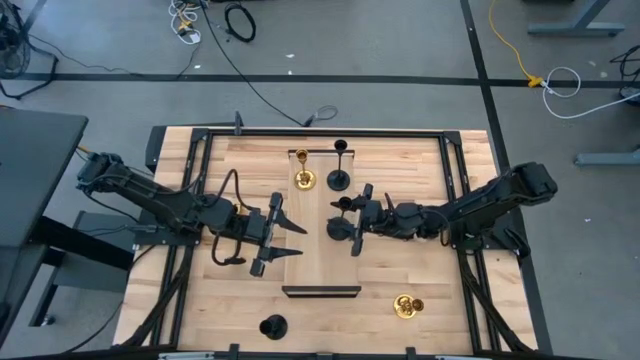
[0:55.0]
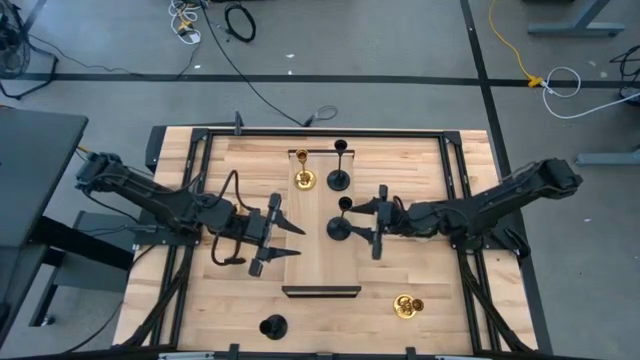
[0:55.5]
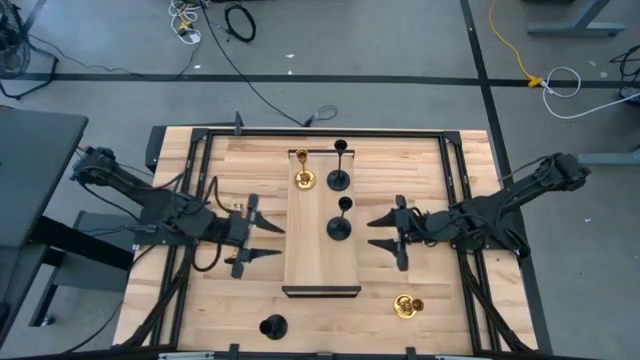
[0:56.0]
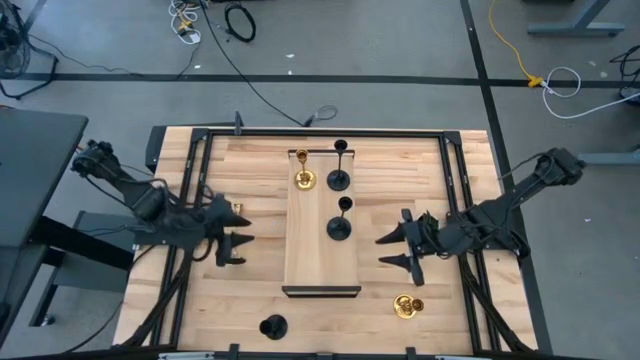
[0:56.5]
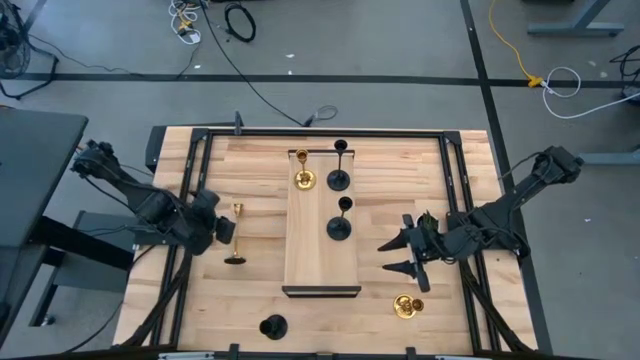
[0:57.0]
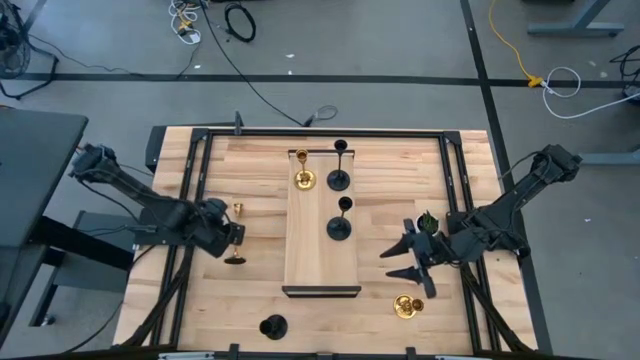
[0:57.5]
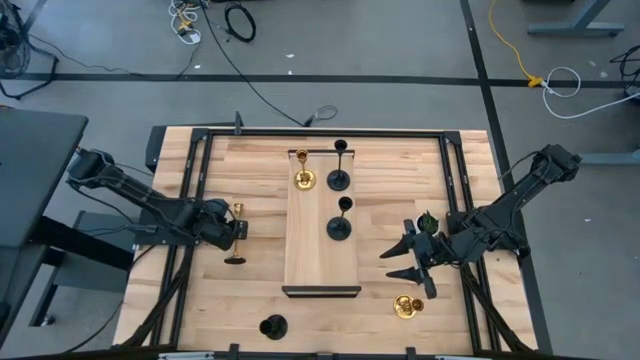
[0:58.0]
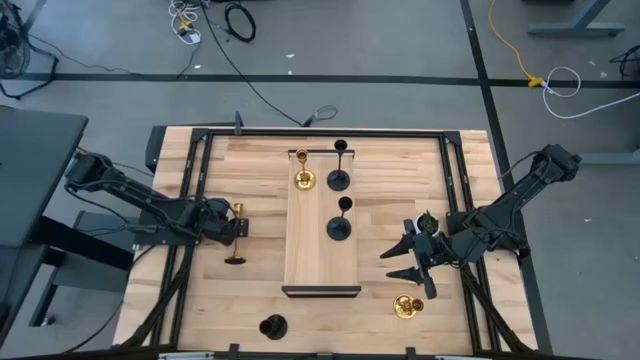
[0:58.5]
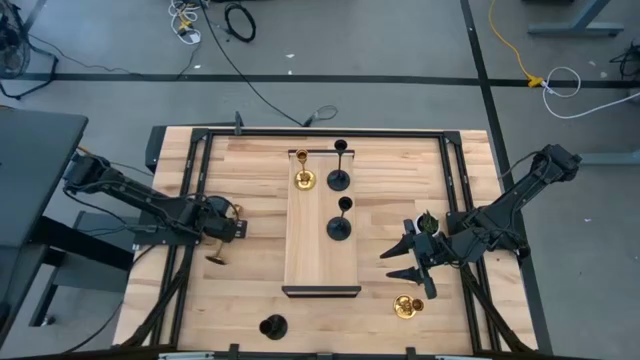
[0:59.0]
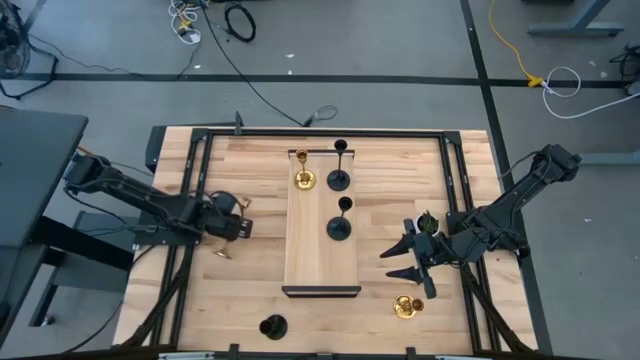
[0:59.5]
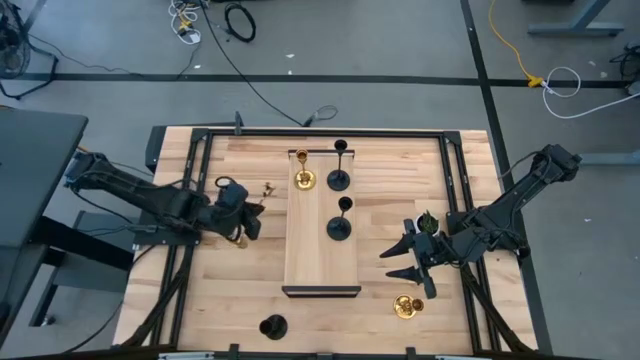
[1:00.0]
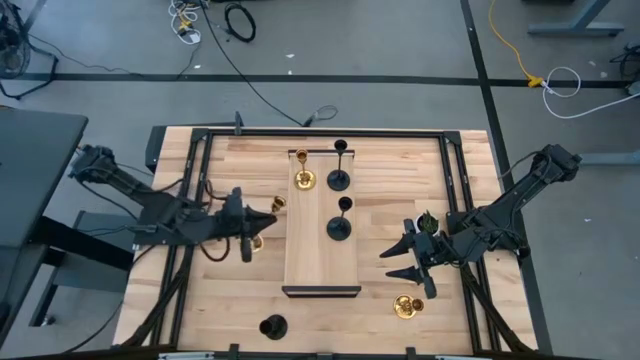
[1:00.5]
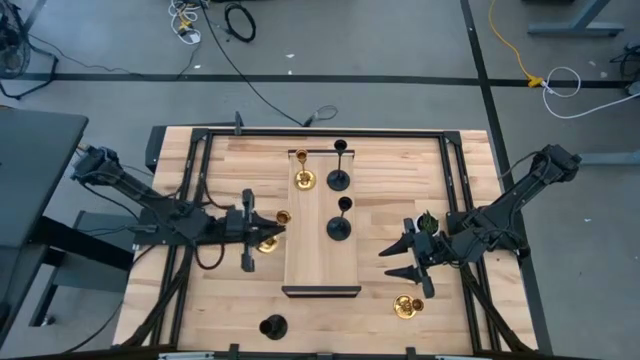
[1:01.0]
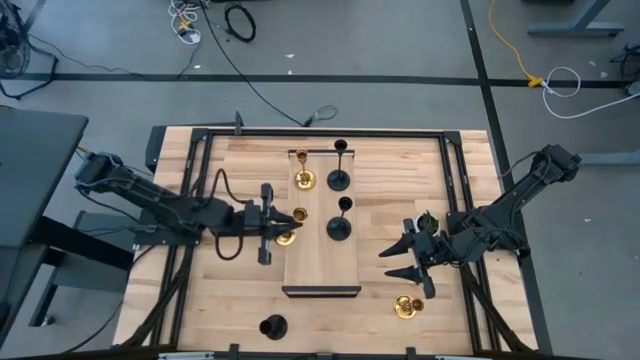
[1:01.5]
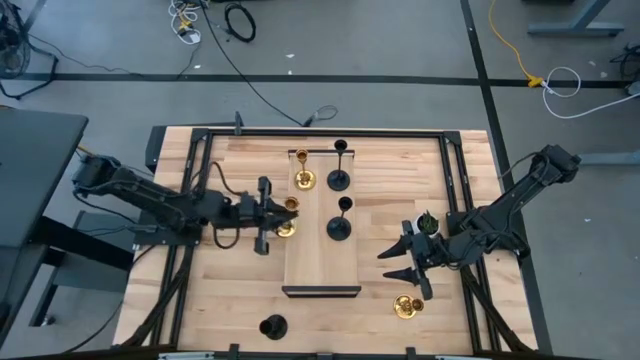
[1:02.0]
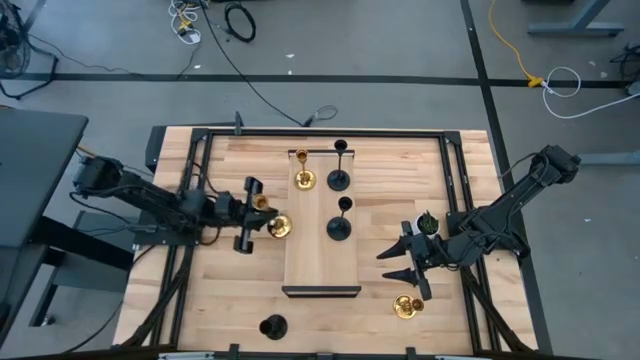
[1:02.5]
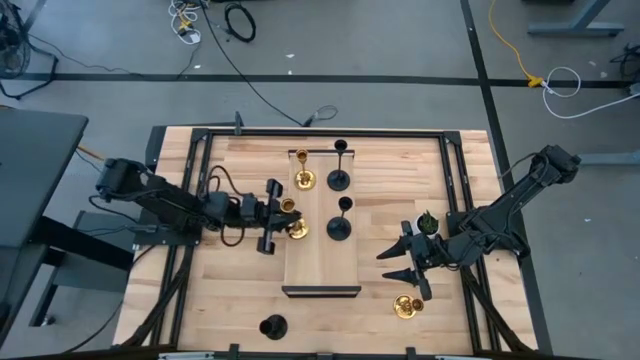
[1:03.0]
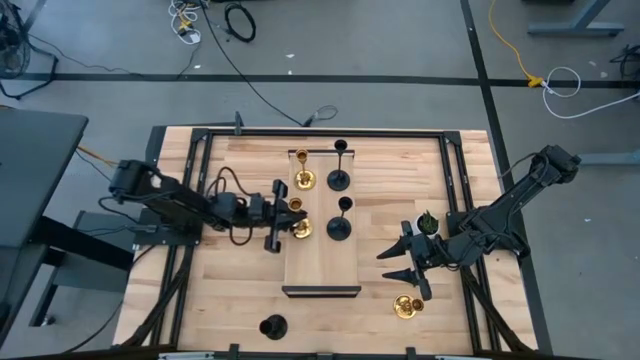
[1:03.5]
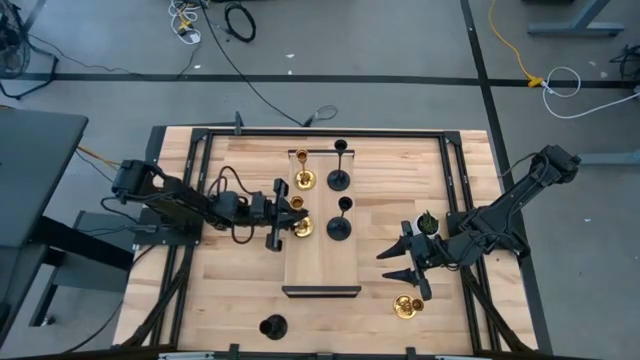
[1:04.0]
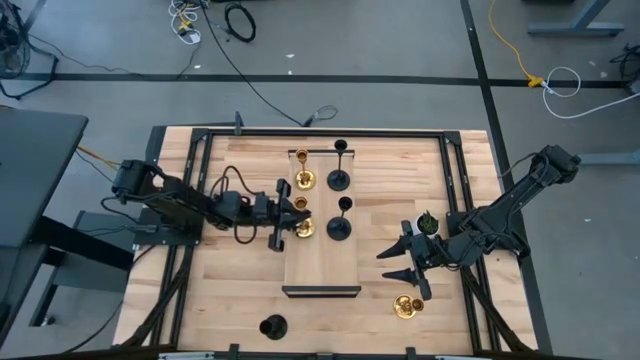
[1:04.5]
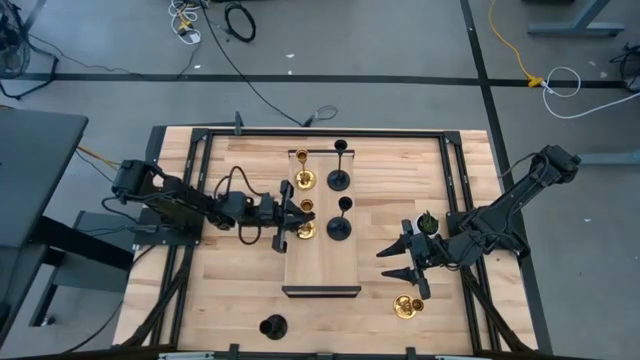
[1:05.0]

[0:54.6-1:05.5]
Task: Pick & Place candle stick holders
Put the top gold candle holder on the shelf

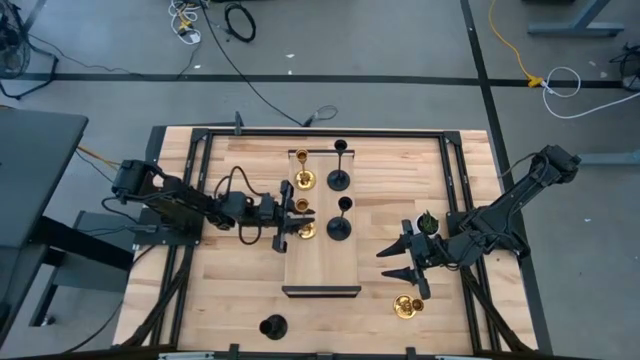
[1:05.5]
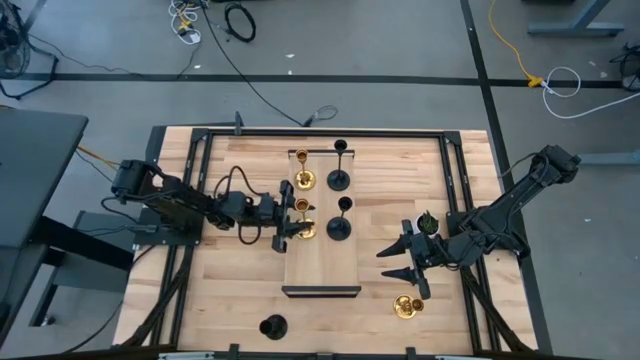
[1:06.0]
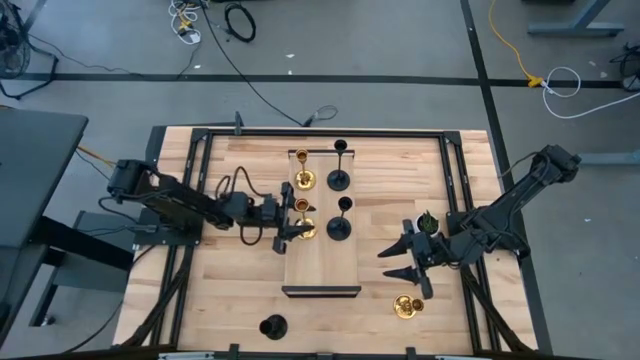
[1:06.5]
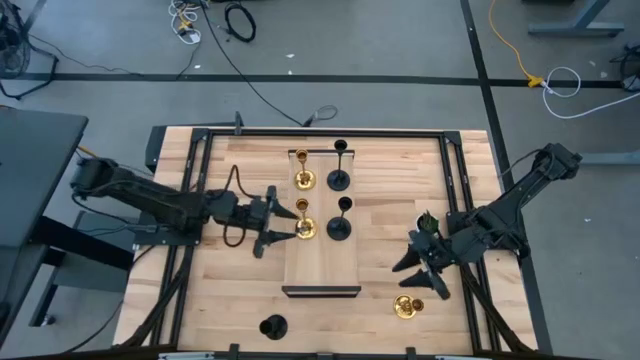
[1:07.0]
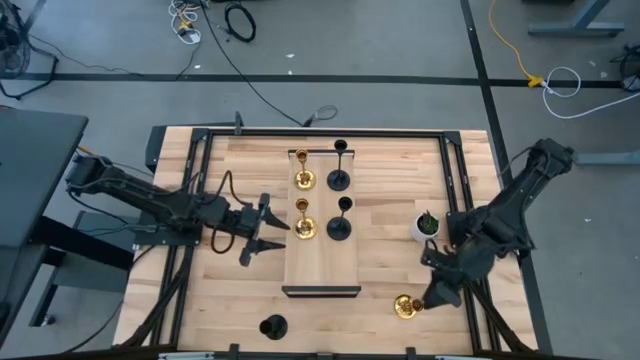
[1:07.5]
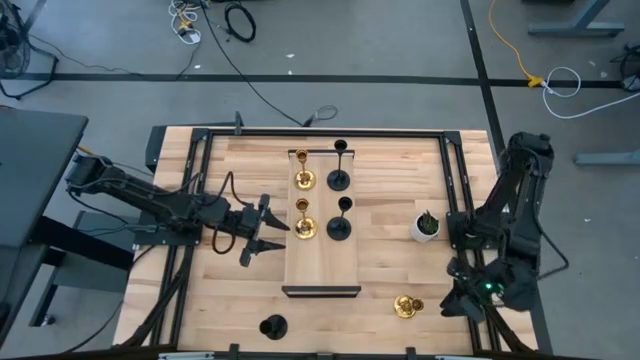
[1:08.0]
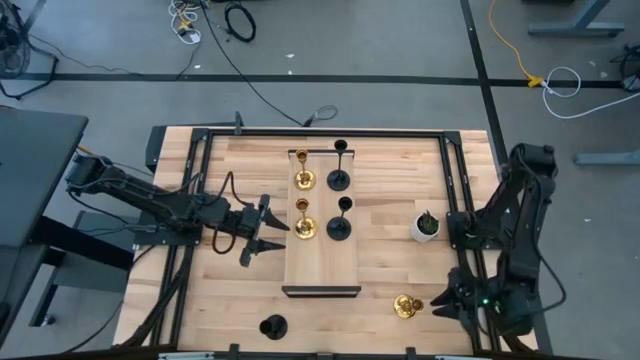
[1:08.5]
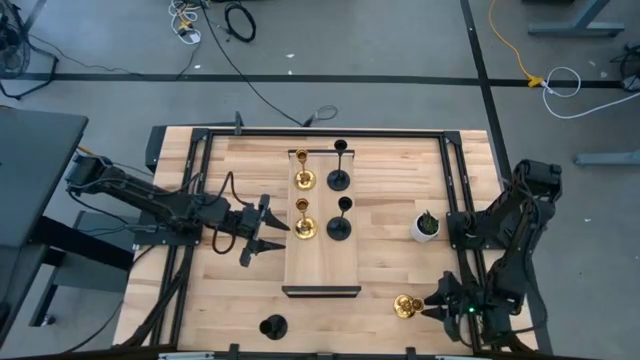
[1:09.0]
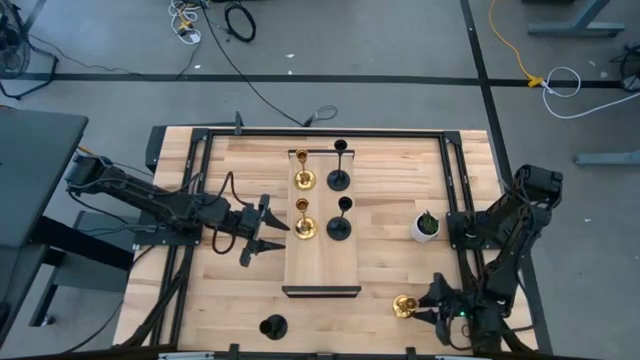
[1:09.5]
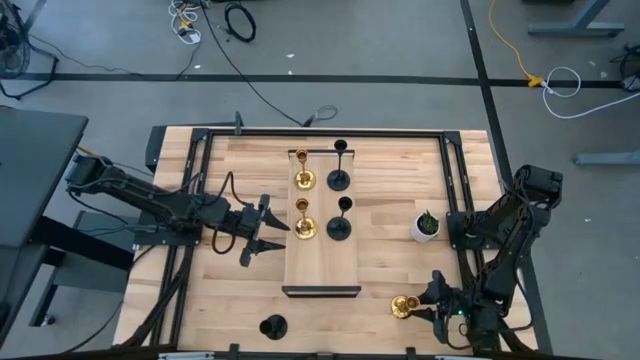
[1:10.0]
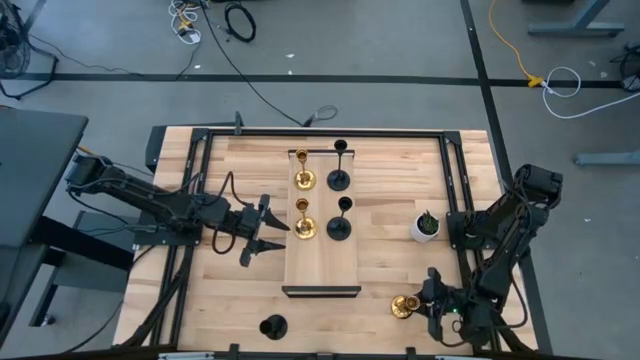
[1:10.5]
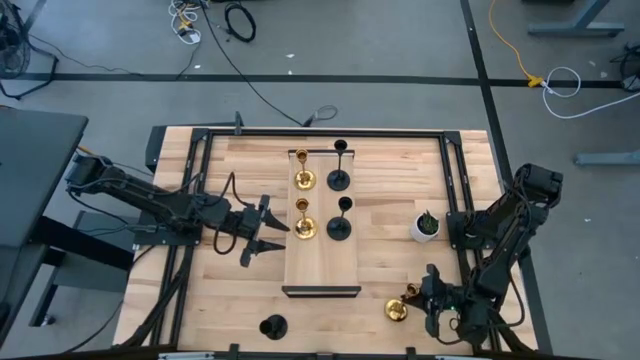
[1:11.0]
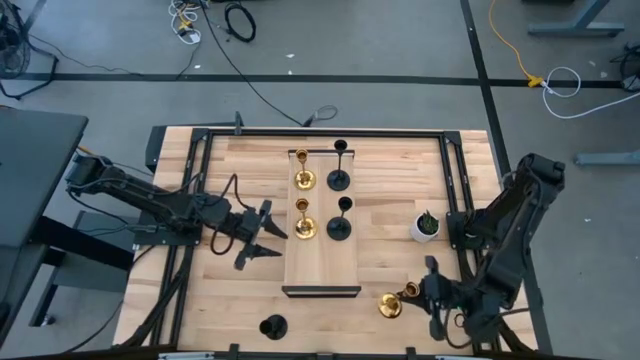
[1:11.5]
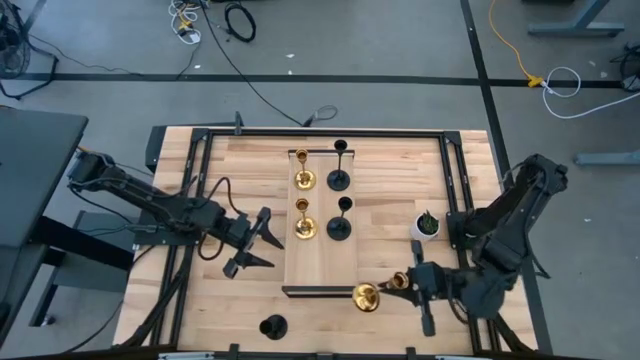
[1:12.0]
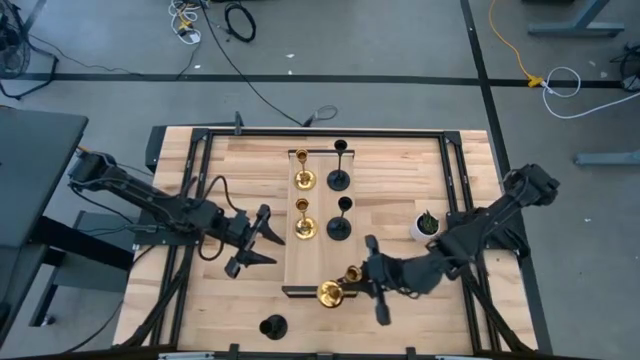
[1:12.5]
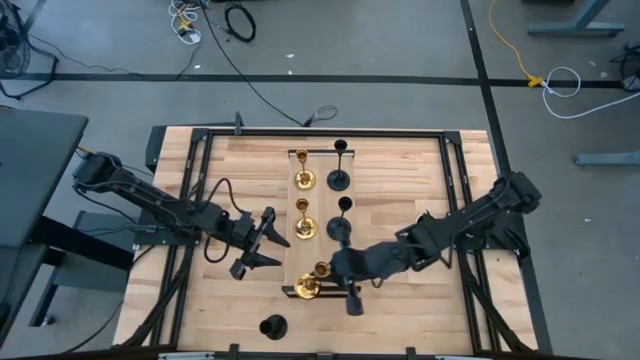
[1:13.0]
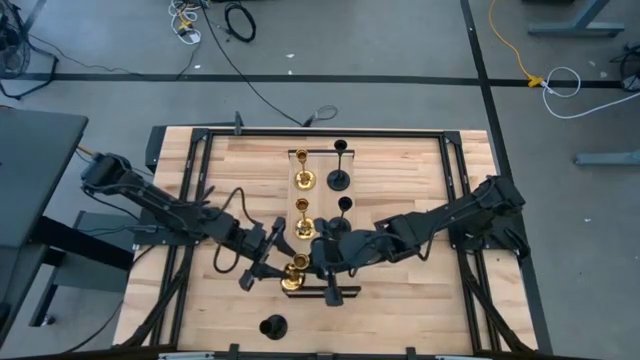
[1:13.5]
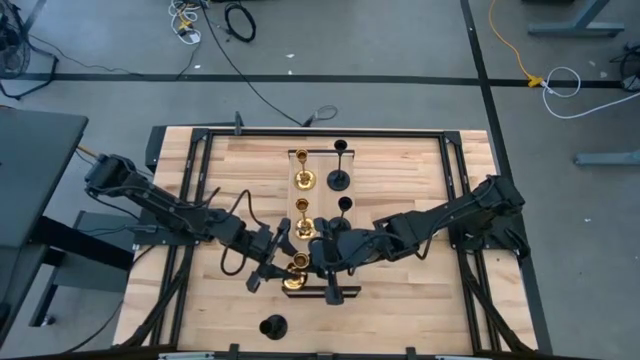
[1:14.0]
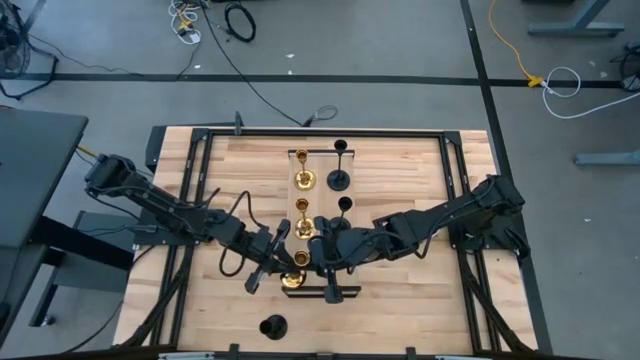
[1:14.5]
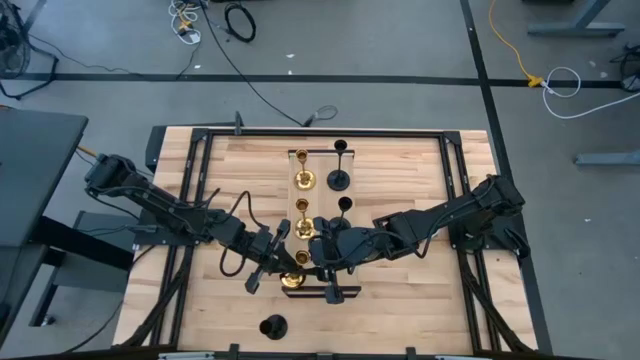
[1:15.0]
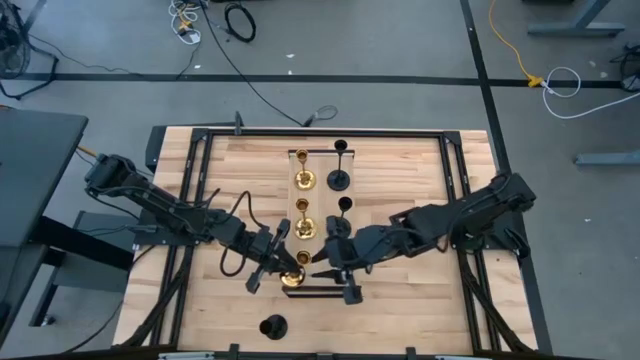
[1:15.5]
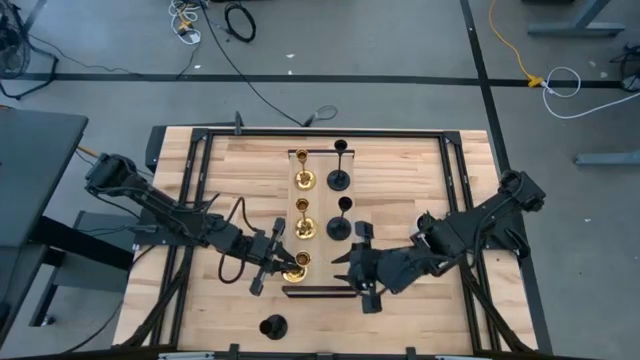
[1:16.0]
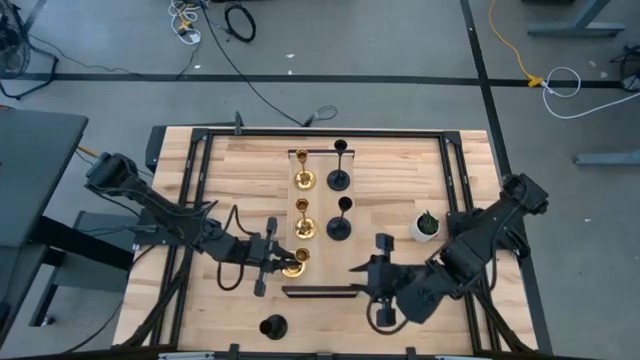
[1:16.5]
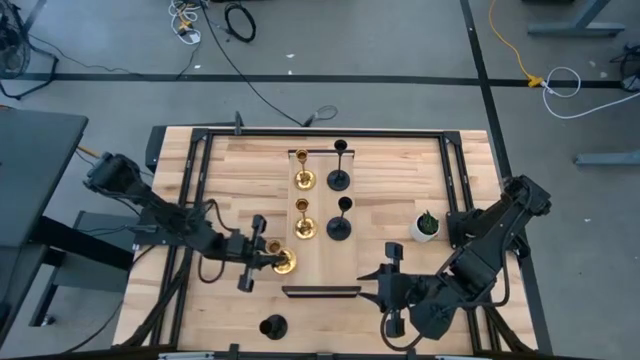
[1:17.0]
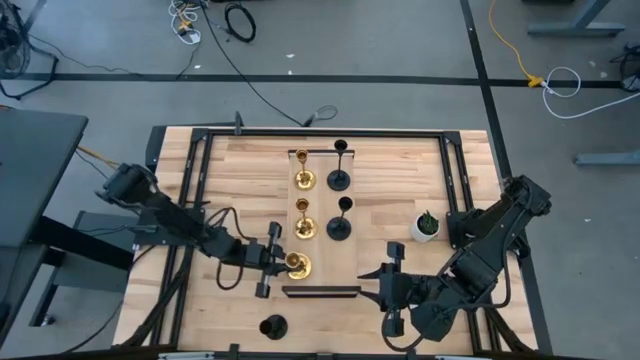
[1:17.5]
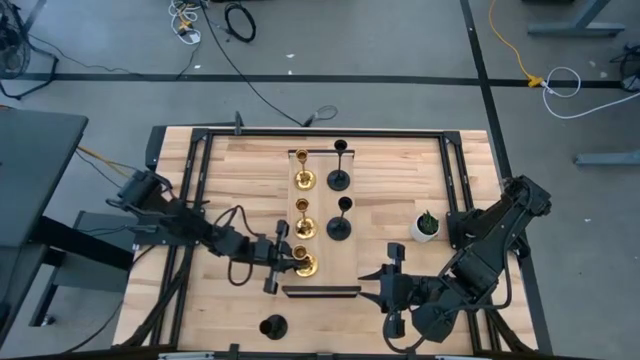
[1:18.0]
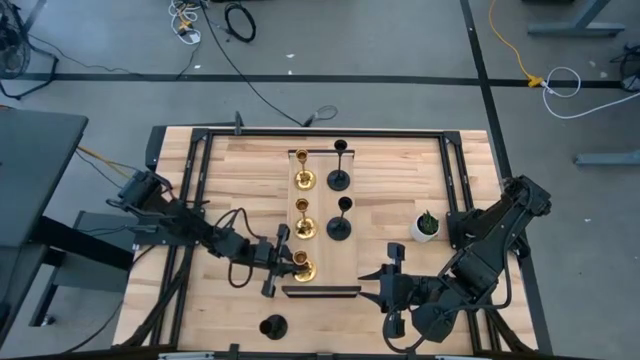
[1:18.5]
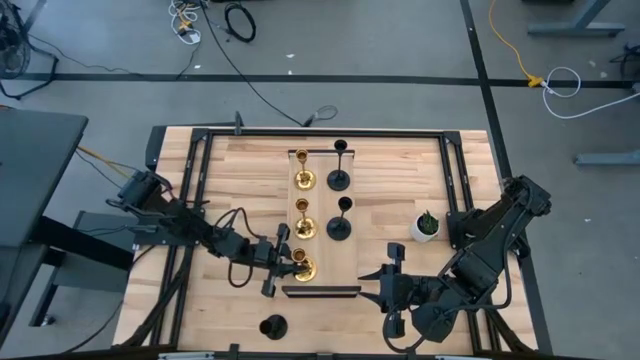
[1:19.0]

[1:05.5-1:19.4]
Put the gold candle holder on the shelf
